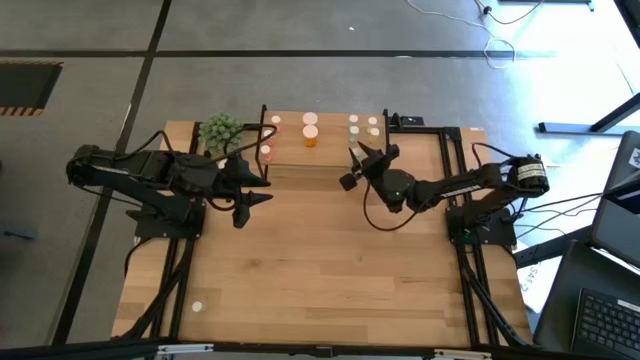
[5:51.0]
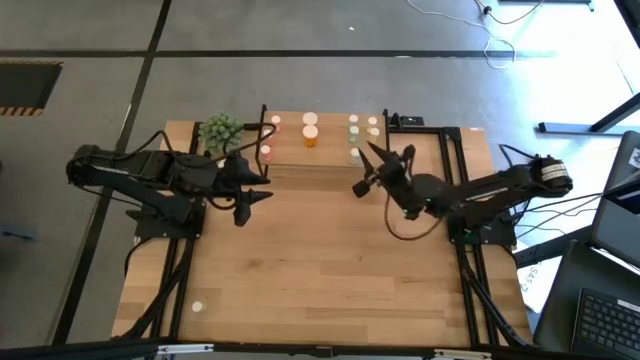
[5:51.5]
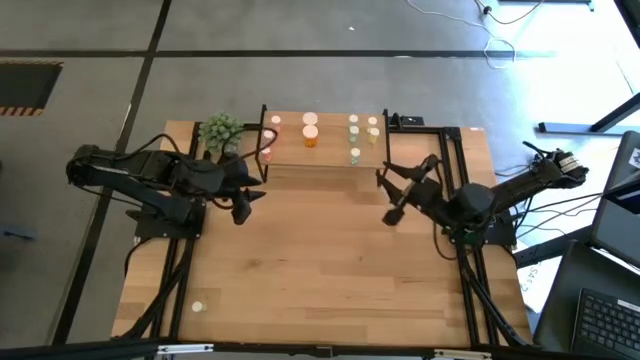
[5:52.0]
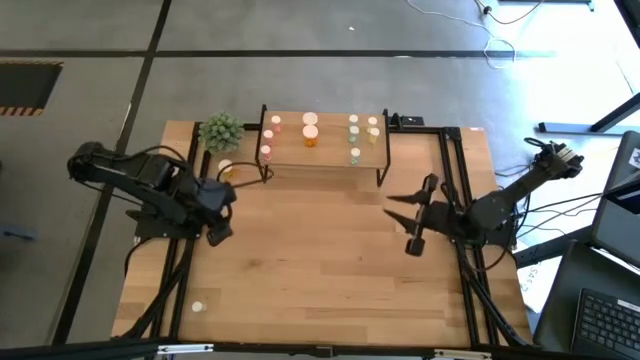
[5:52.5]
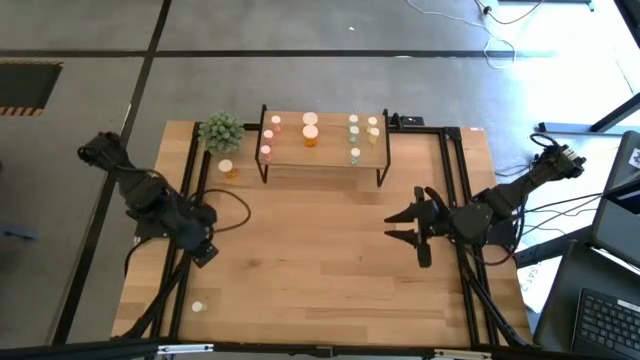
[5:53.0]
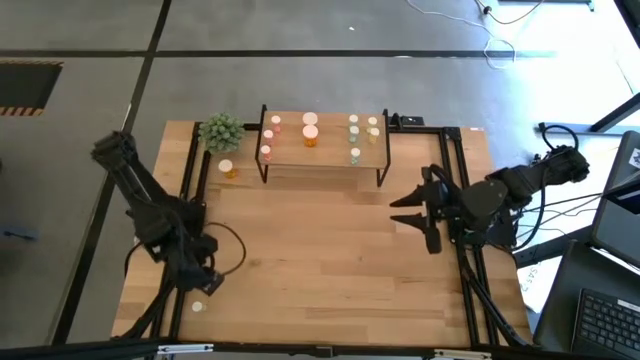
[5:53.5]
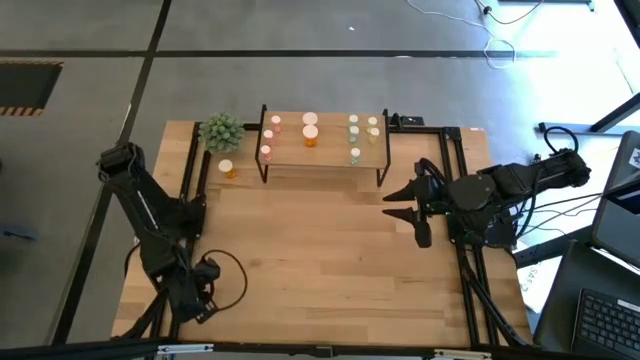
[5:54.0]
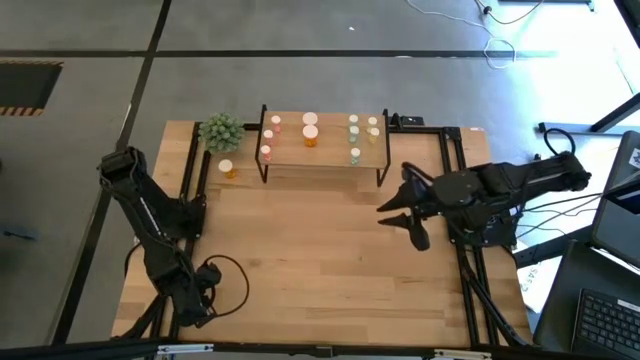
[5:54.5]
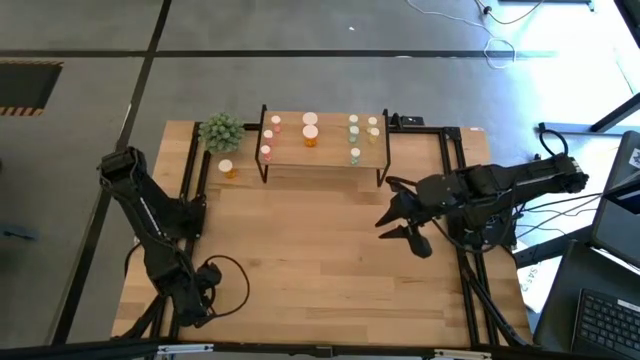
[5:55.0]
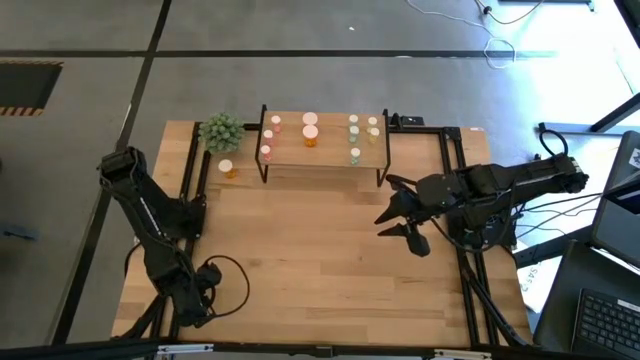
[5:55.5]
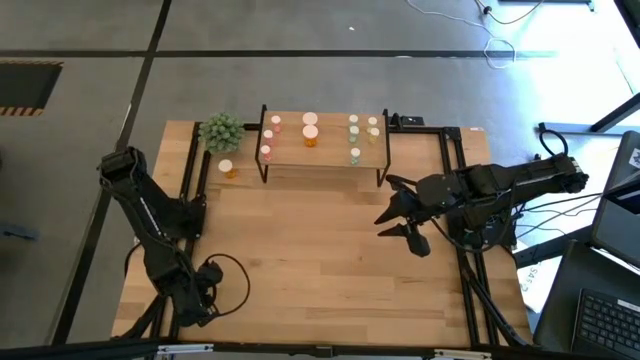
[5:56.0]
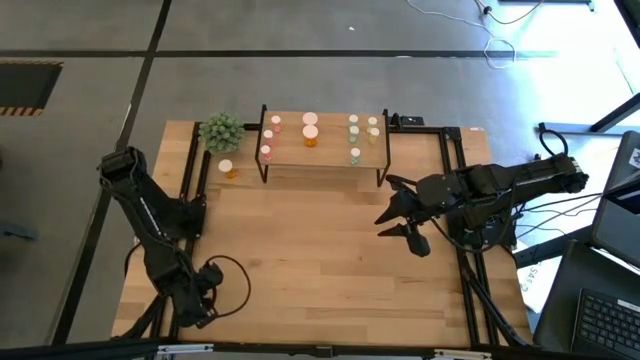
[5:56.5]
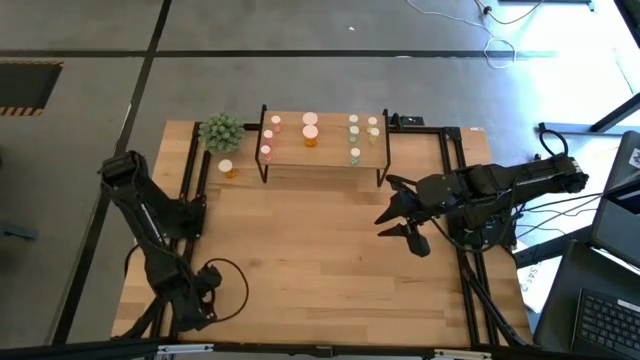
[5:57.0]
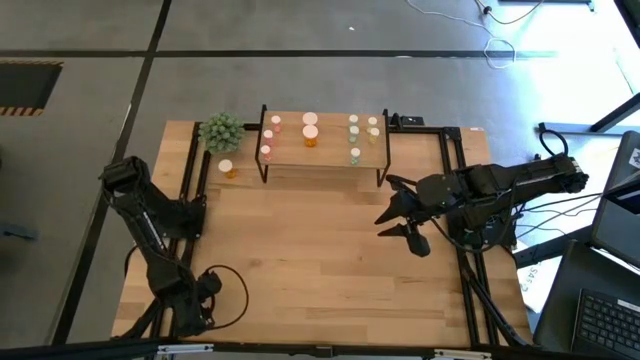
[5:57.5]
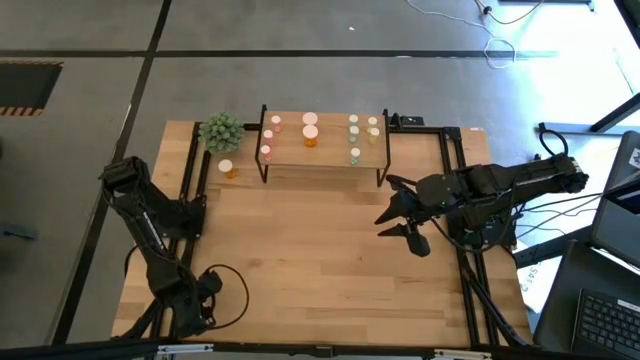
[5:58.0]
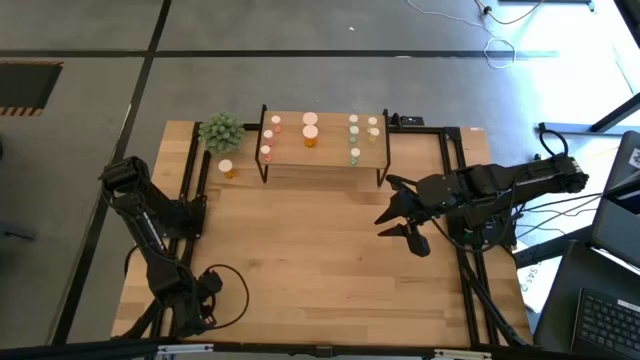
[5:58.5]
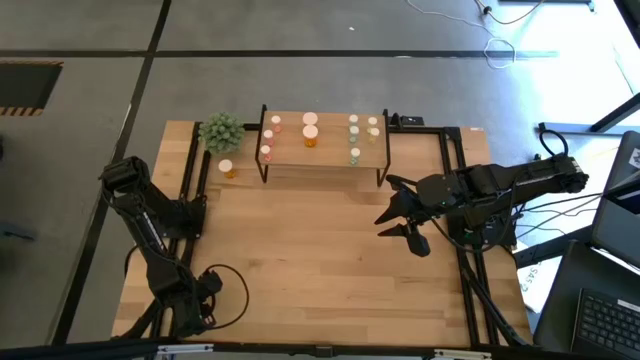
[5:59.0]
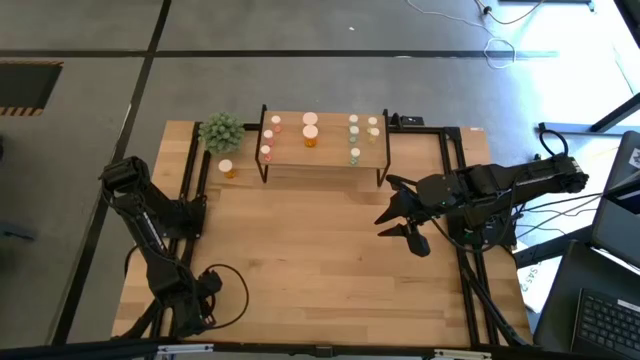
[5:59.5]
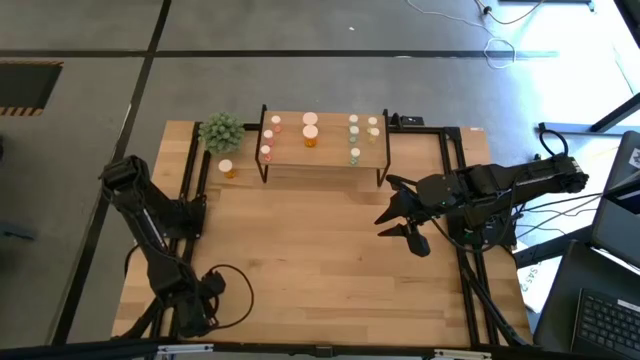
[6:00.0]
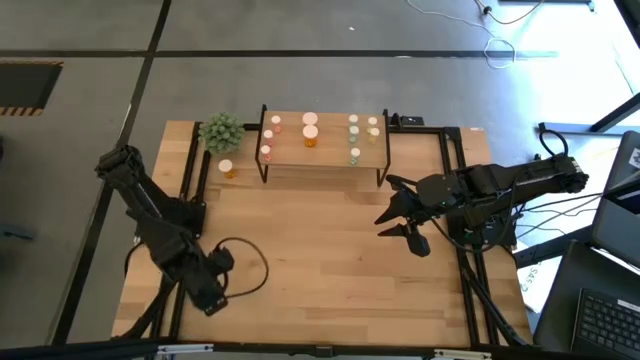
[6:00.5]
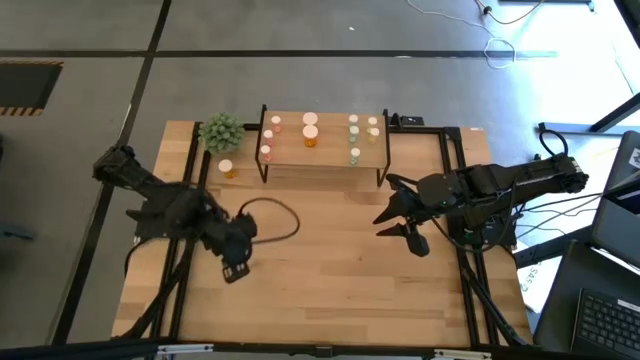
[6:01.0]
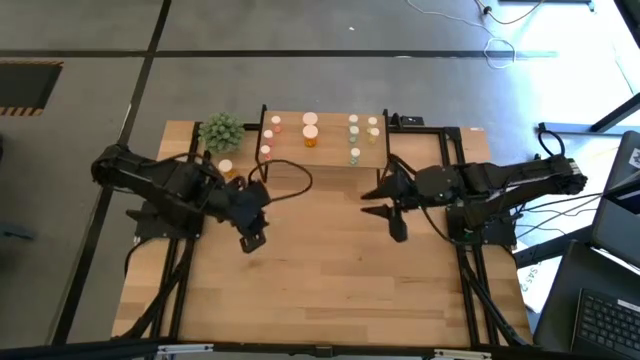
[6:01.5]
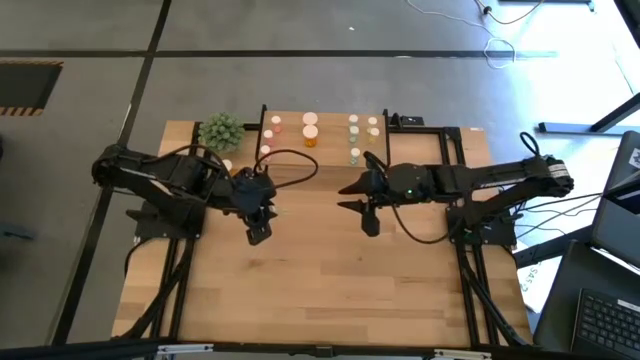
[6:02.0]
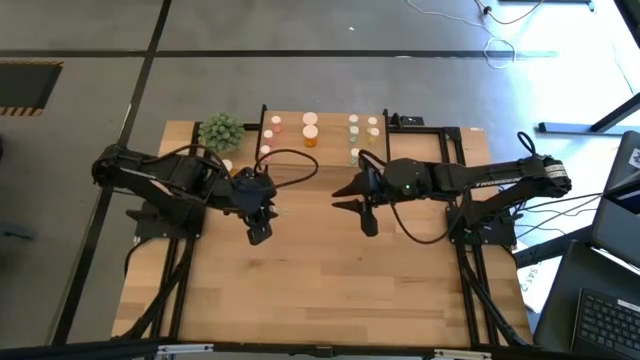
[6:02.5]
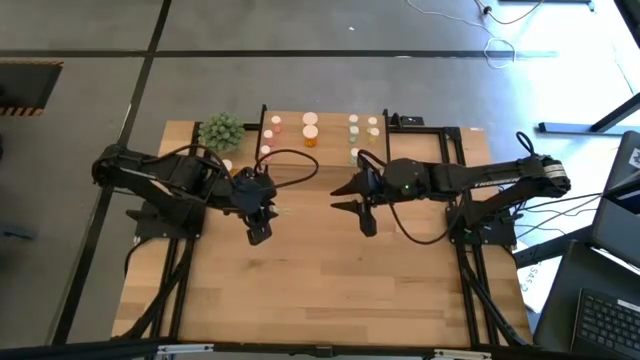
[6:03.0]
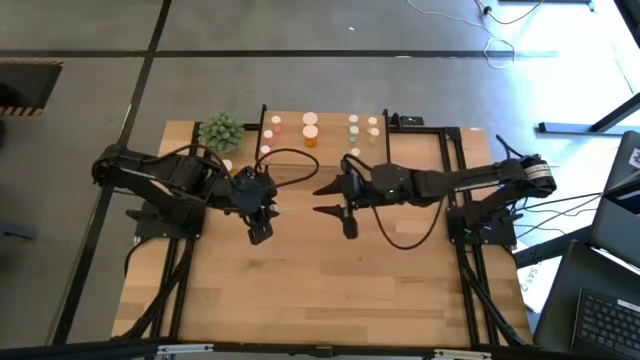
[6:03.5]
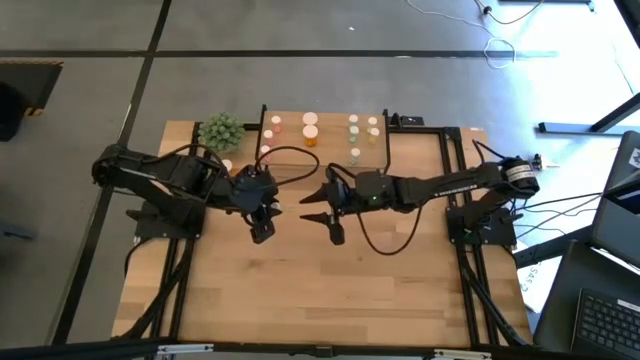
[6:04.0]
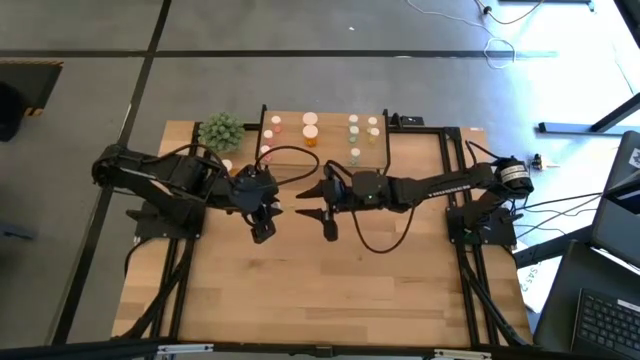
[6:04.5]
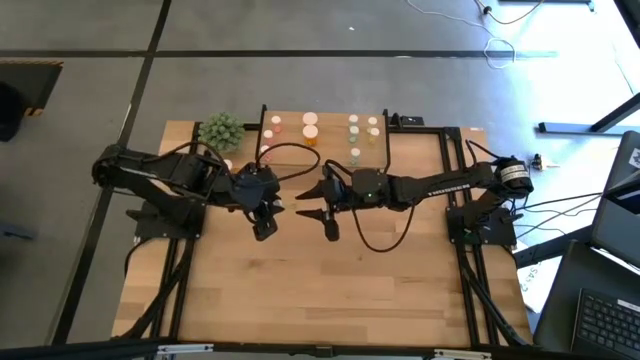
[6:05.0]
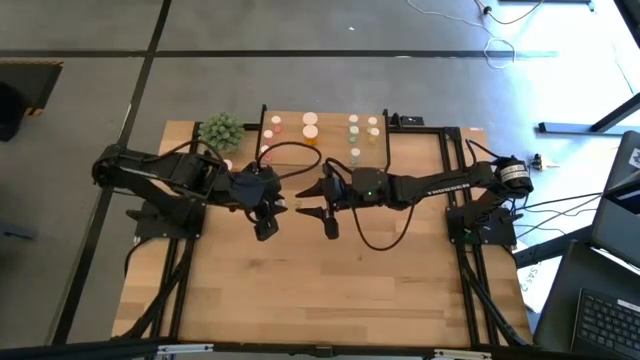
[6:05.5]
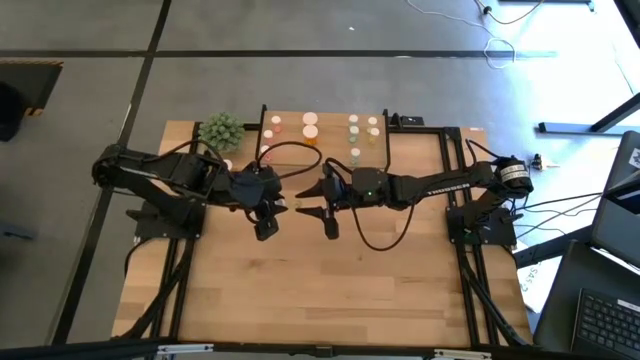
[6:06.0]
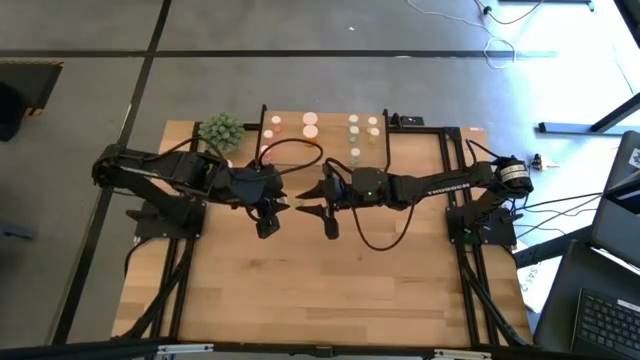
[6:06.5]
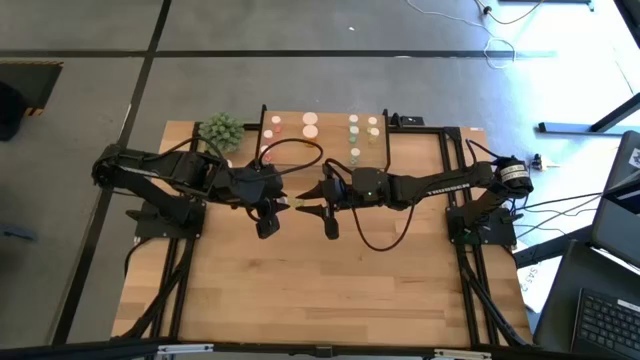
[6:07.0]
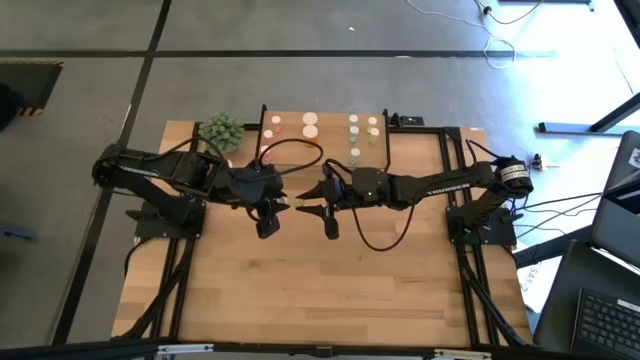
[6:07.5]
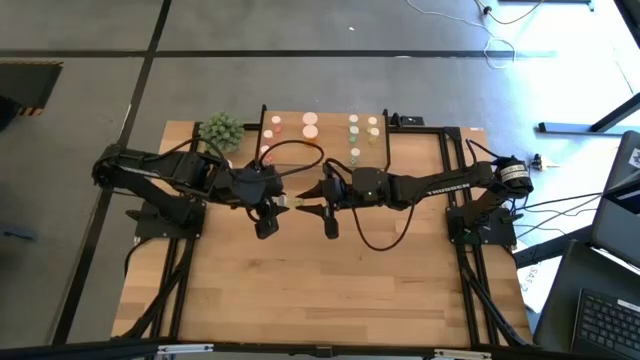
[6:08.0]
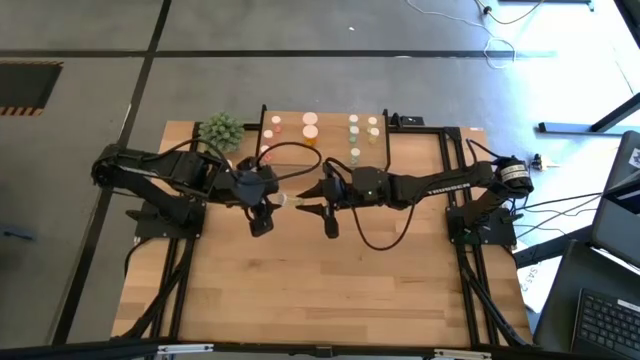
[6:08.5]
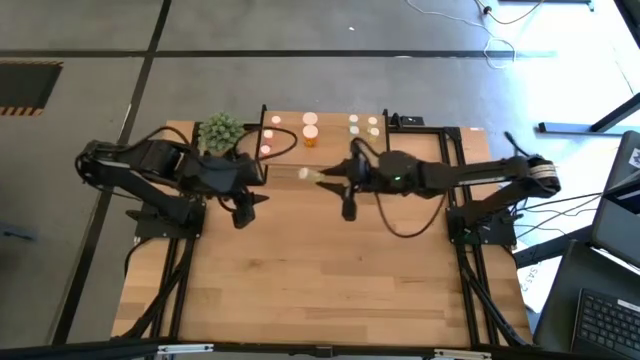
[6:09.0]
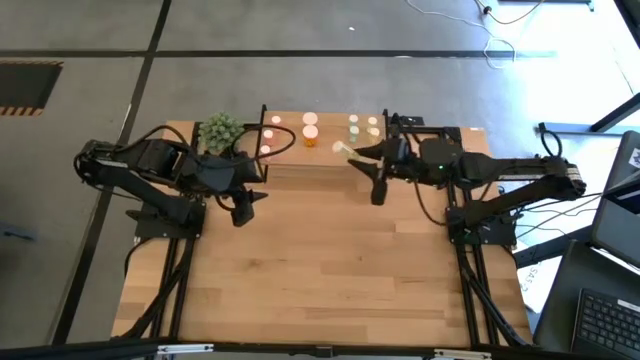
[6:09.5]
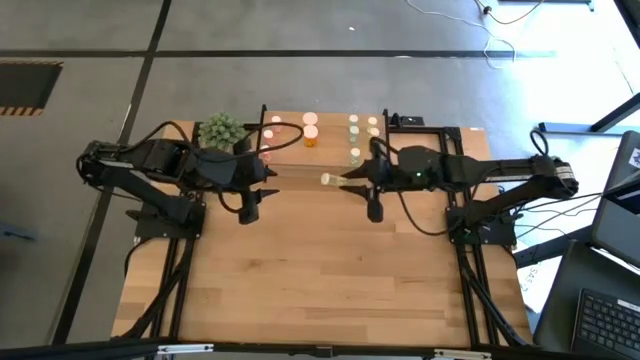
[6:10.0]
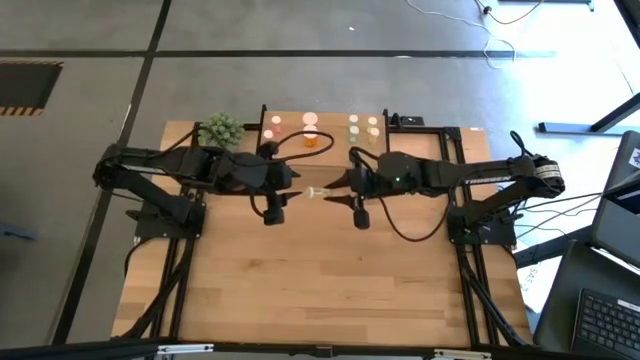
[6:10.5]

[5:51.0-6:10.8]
Task: Pick and place medicine bottles onto shelf by color
Put the yellow medicine bottle on the shelf, aligned with the other yellow medicine bottle
